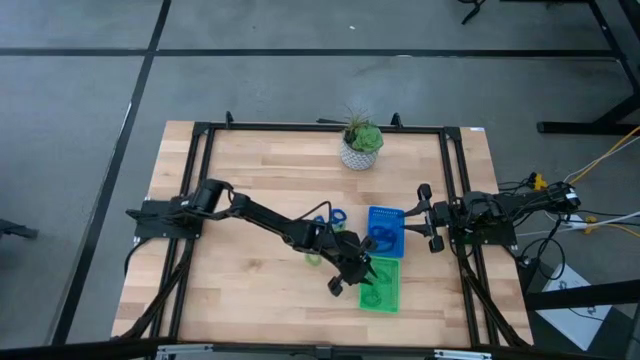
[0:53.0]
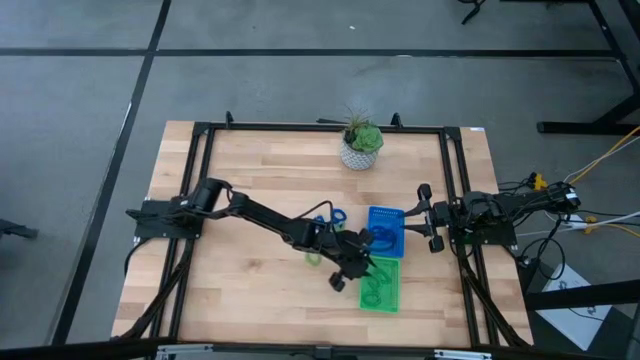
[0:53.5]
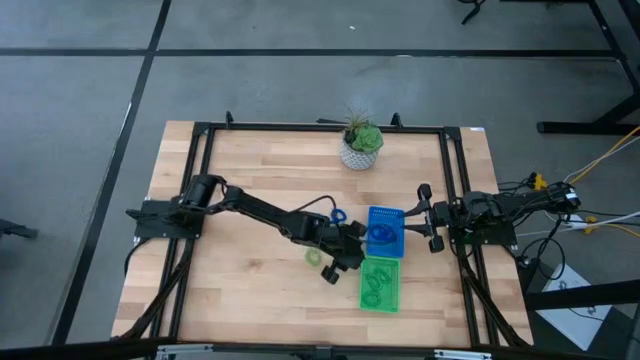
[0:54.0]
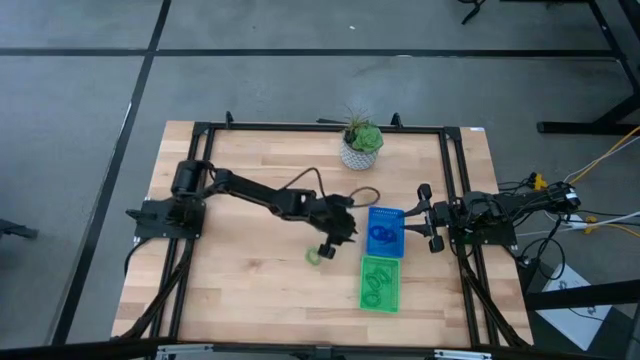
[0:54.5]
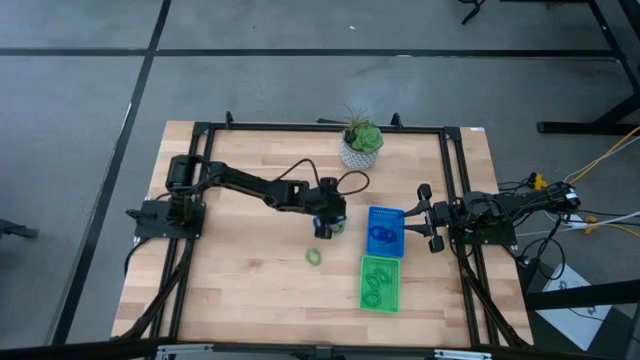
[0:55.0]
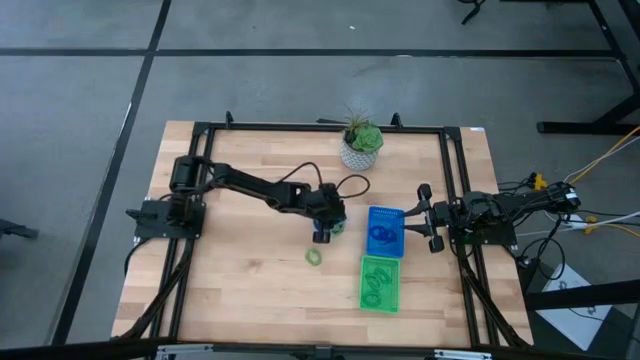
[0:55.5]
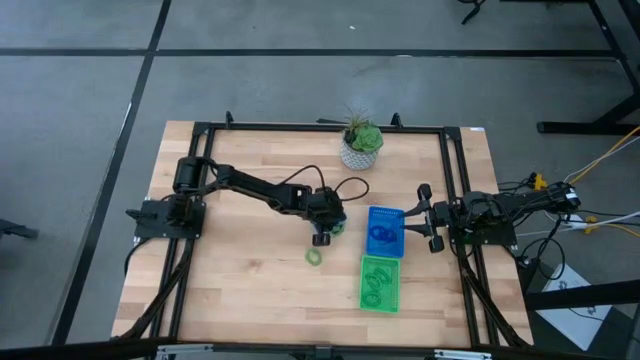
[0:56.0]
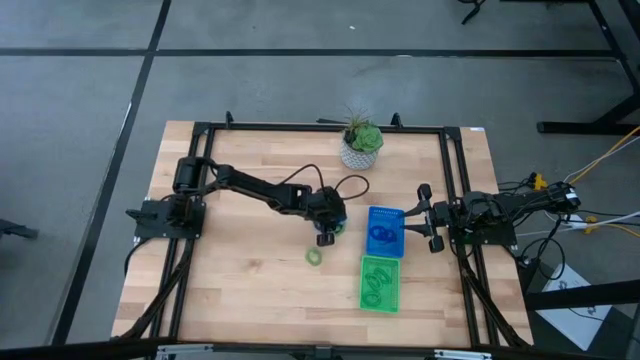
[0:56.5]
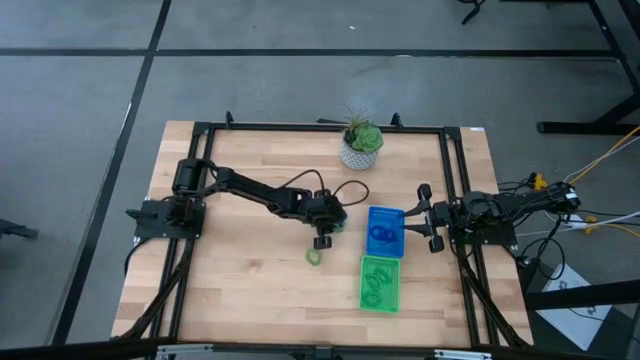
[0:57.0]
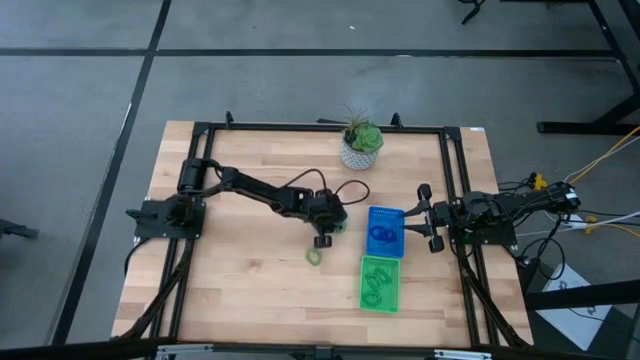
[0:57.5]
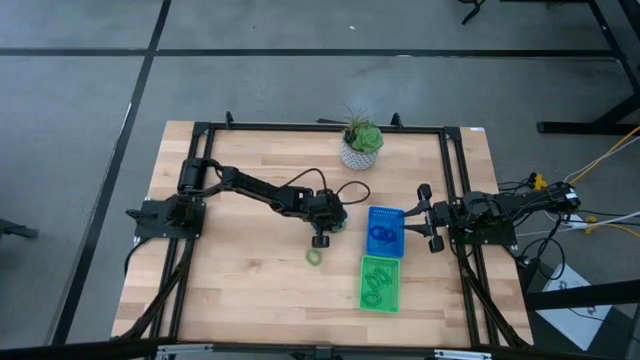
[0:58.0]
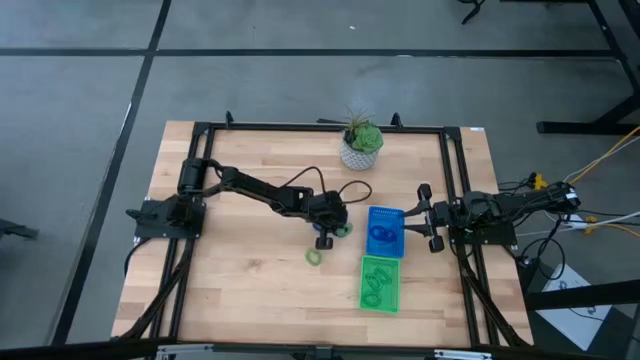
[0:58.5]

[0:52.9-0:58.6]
Task: Sort spring keychains
Put the green spring keychain into the green bin

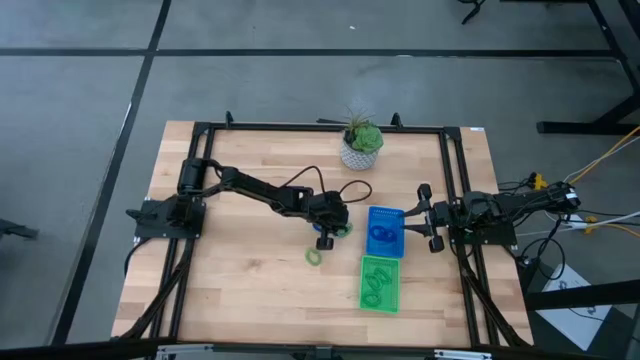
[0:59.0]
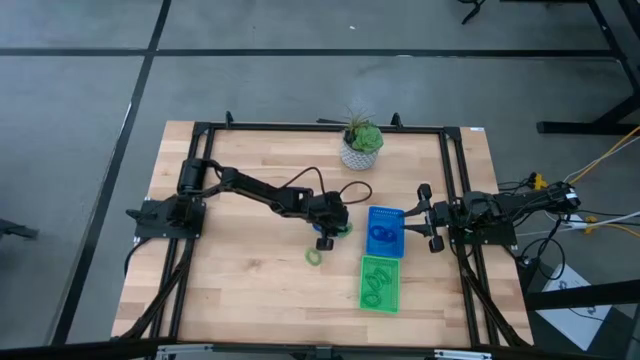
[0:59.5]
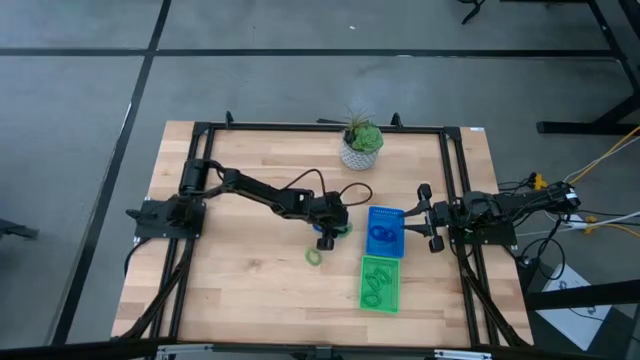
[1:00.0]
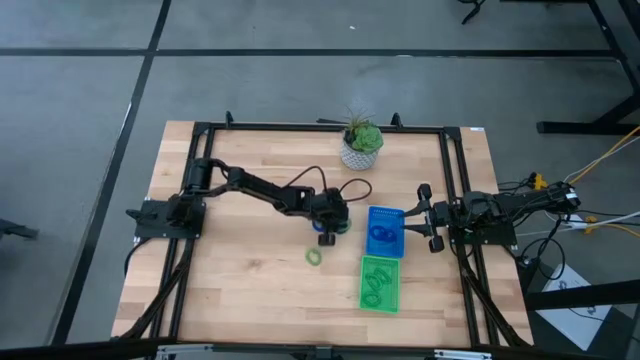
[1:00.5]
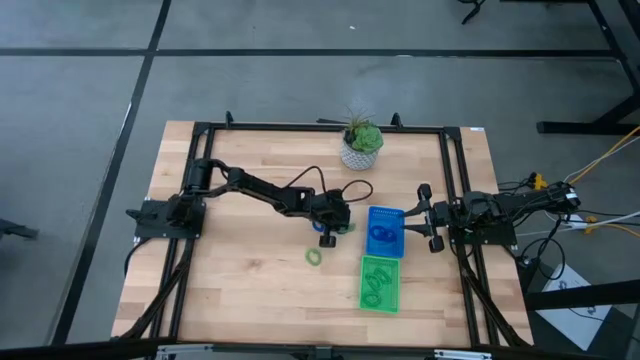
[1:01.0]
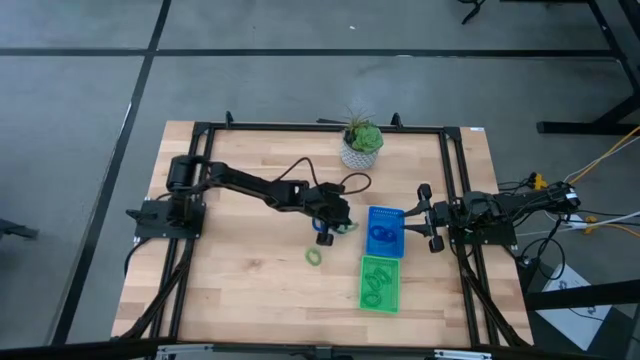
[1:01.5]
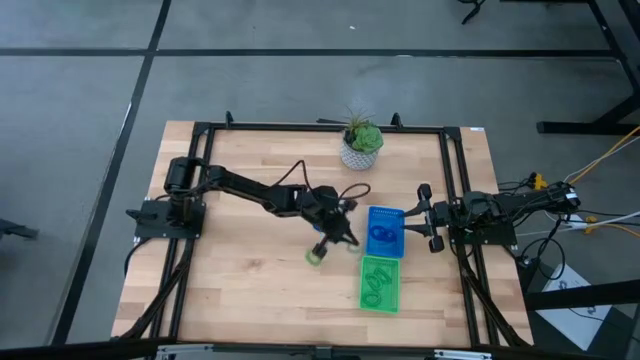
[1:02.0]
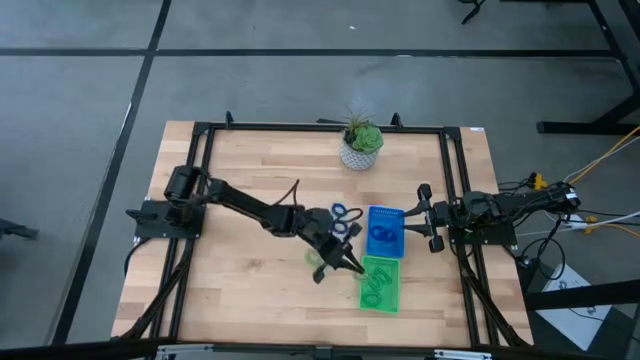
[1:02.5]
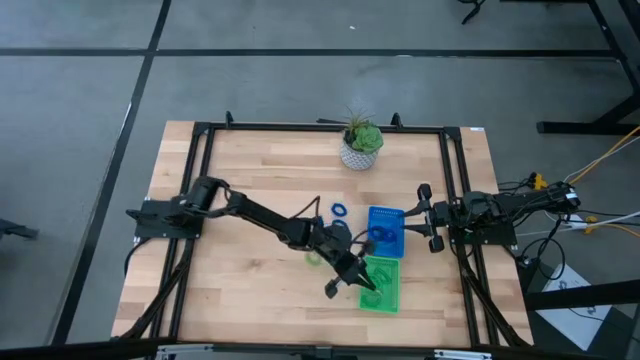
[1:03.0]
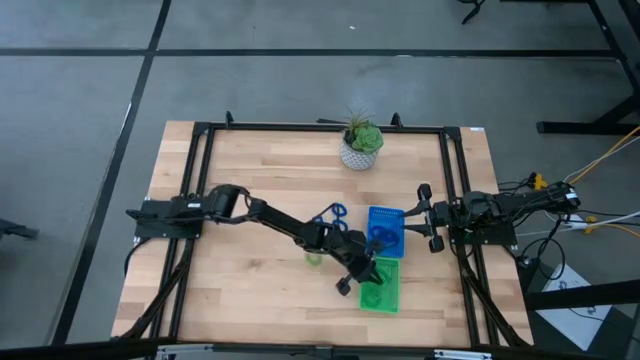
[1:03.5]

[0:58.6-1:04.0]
Put the green spring keychain into green bin

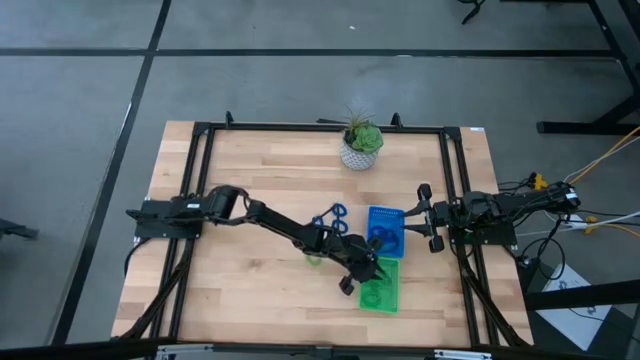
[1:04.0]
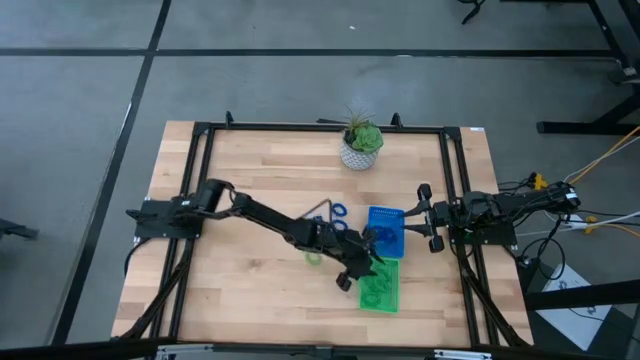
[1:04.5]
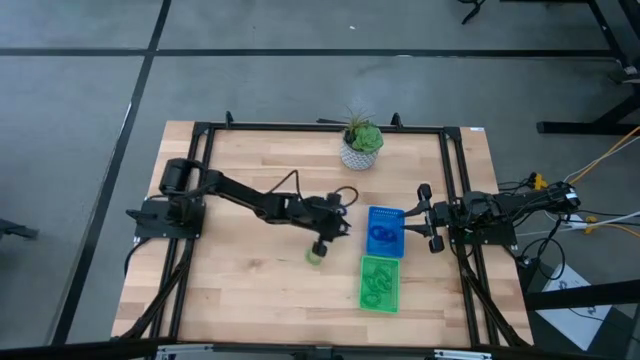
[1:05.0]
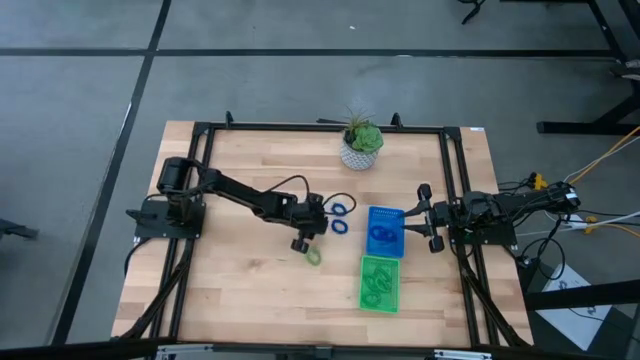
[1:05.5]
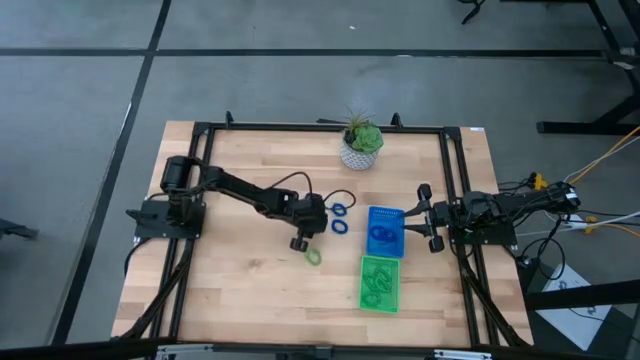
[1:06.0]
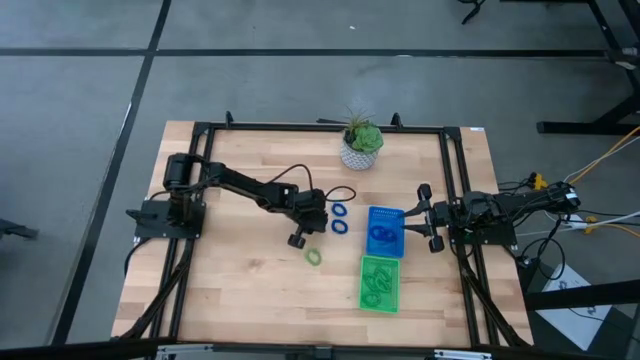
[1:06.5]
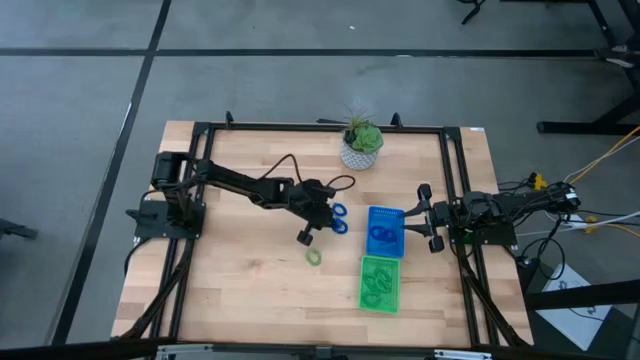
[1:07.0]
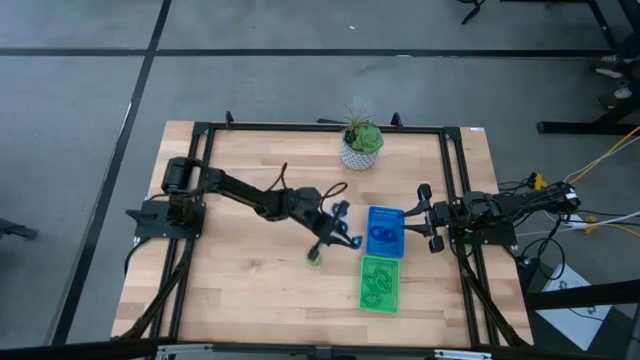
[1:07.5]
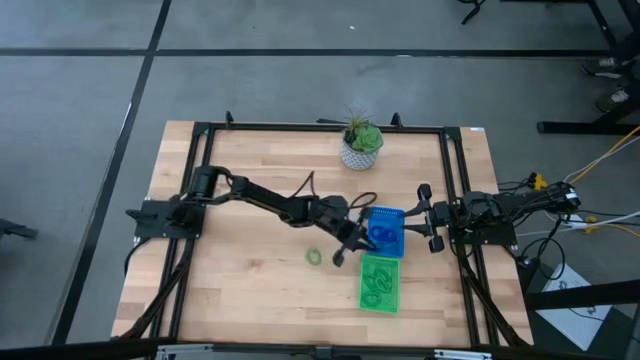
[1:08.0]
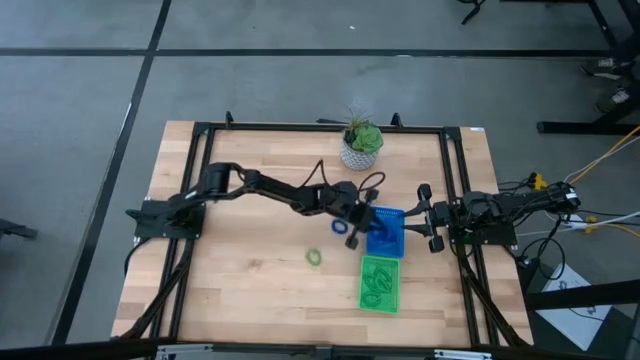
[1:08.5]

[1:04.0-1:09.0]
Put the blue spring keychain into the blue bin

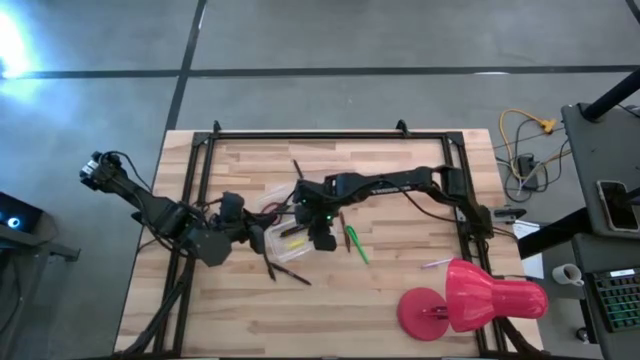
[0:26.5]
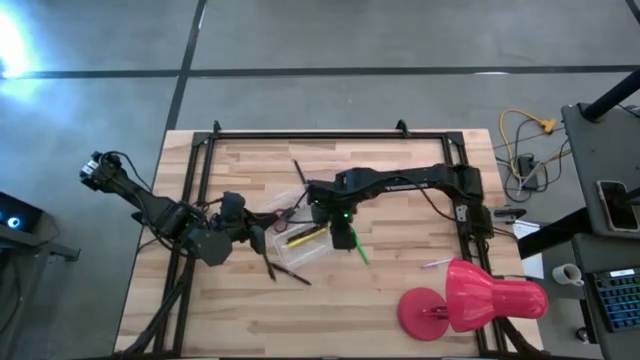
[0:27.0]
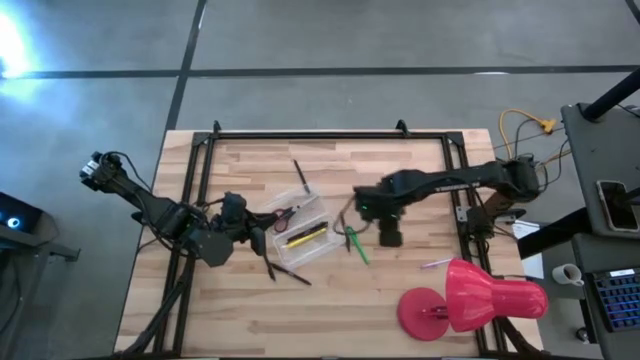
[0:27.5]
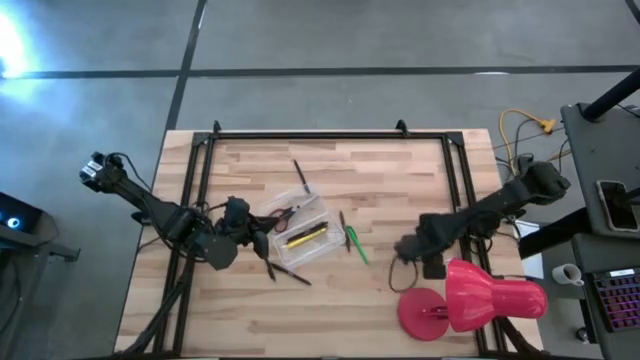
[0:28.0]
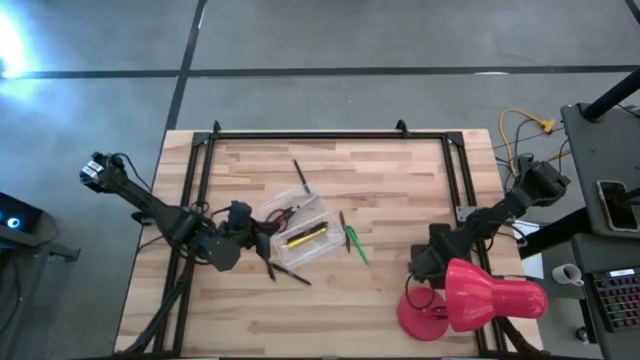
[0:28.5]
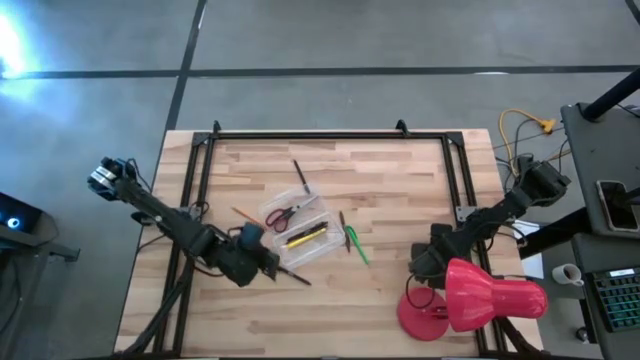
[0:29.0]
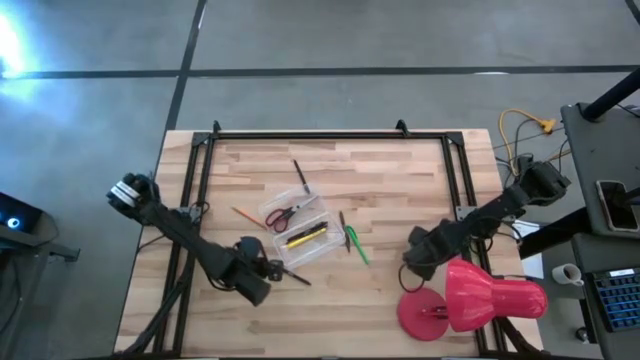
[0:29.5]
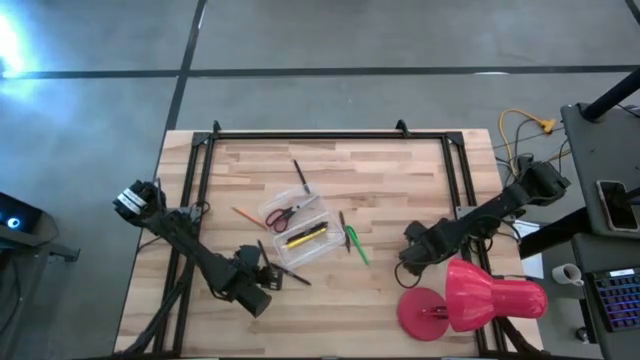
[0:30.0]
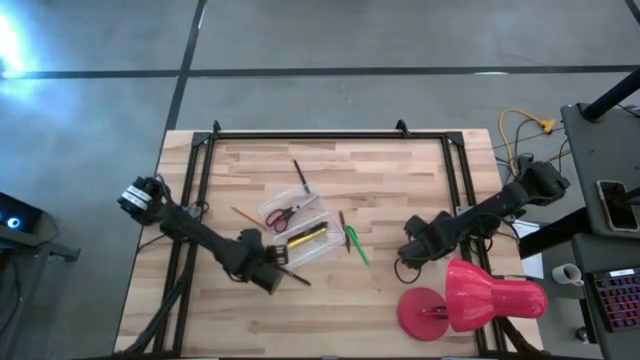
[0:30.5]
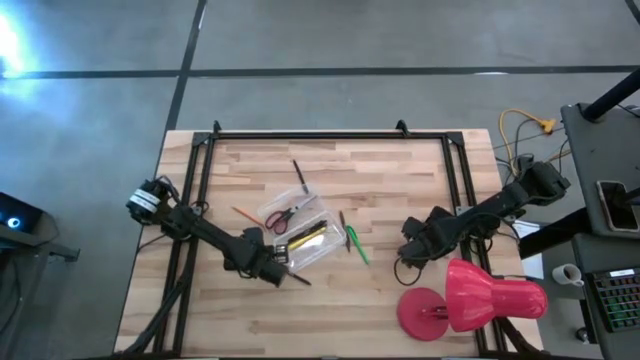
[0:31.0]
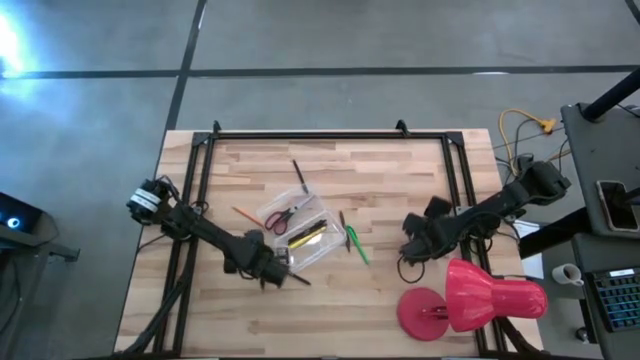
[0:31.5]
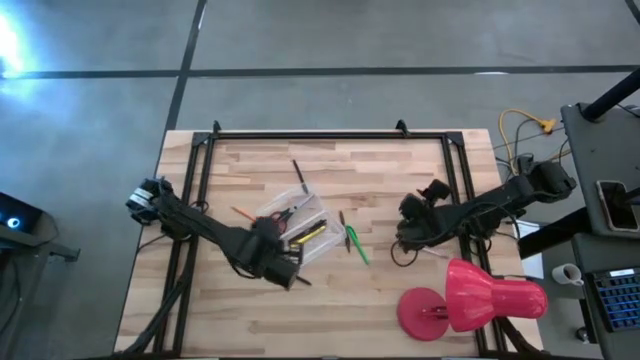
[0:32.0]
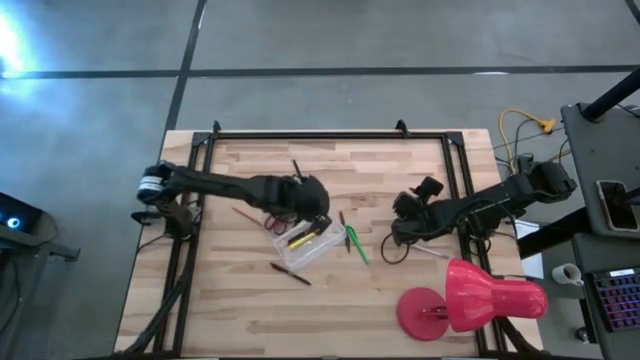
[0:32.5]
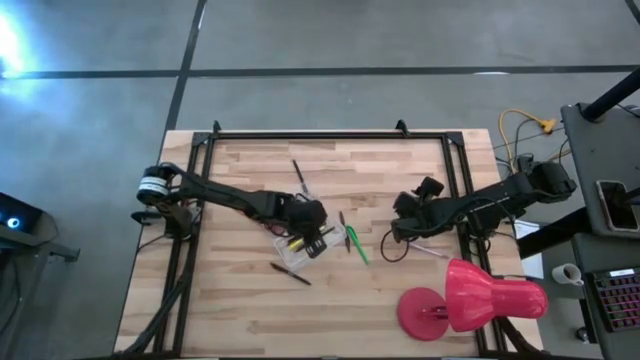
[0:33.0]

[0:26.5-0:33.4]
Task: Pick & place school supplies into a supply box
Put the bottom right black pen into the stationery box
